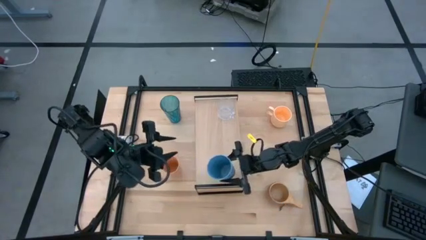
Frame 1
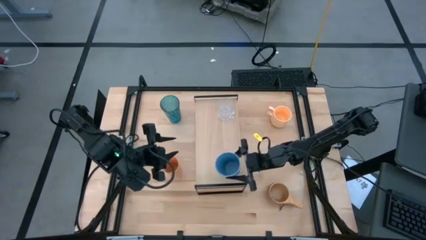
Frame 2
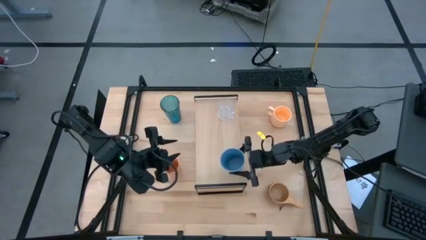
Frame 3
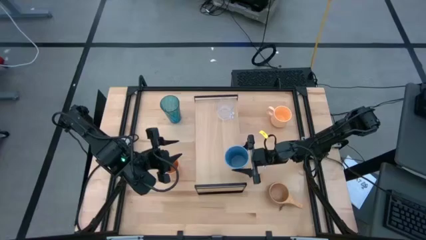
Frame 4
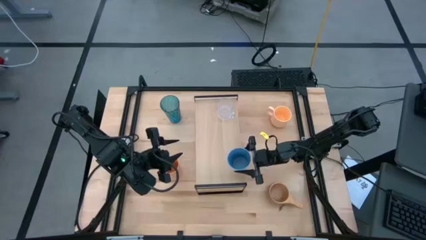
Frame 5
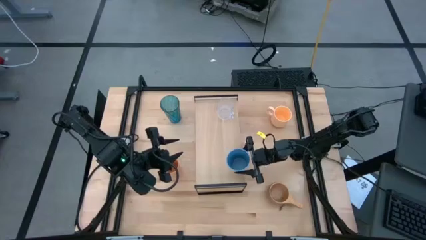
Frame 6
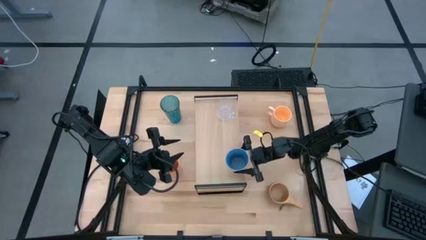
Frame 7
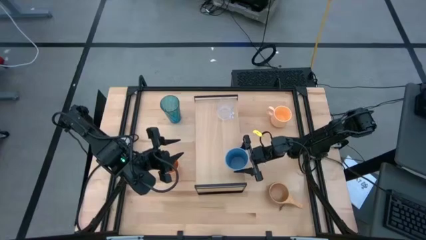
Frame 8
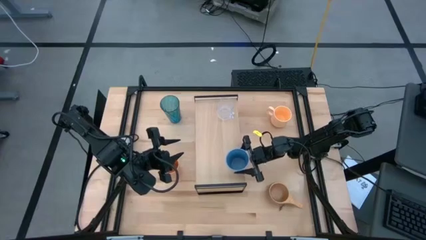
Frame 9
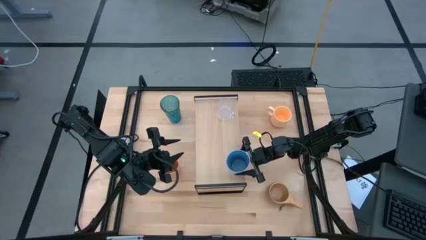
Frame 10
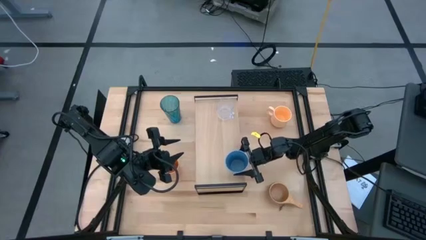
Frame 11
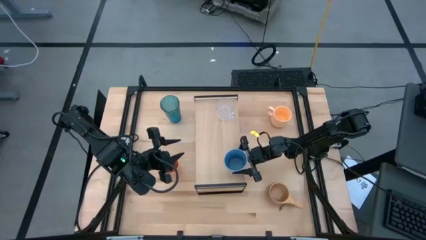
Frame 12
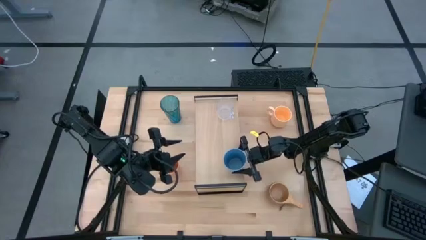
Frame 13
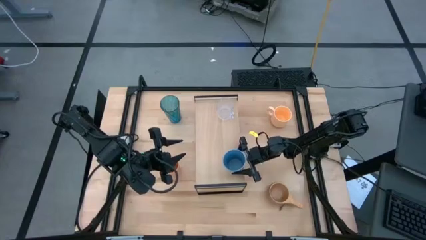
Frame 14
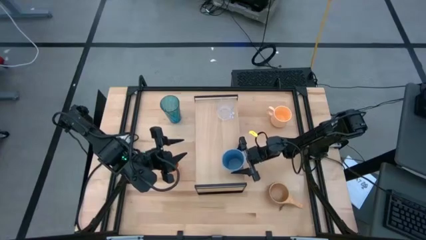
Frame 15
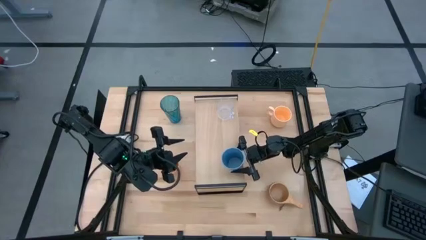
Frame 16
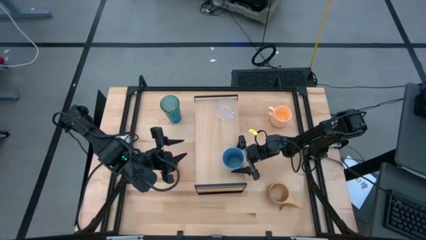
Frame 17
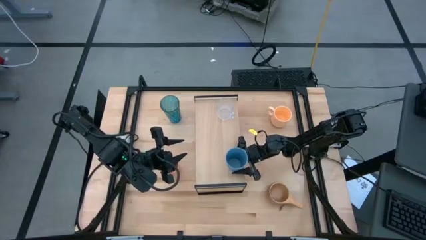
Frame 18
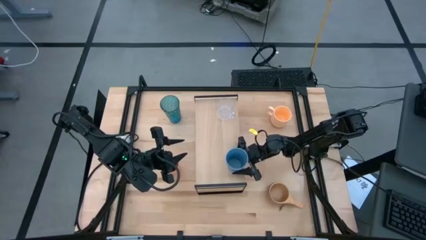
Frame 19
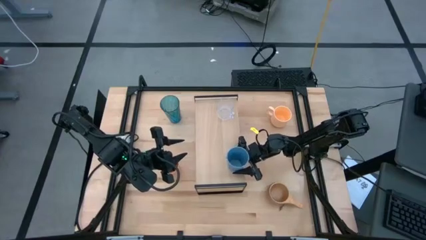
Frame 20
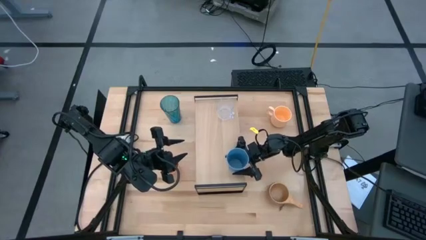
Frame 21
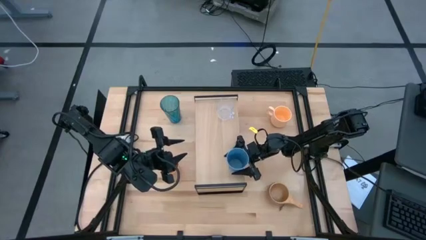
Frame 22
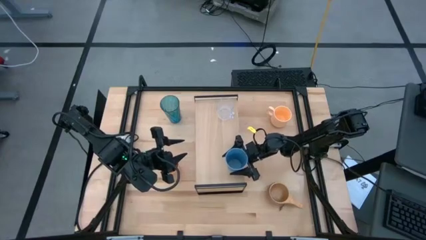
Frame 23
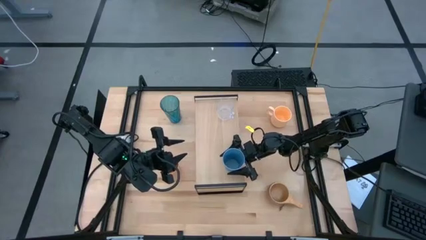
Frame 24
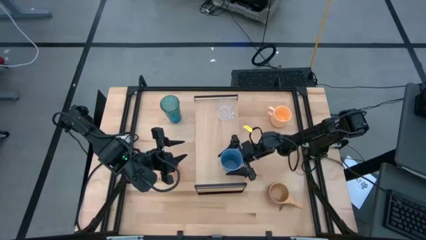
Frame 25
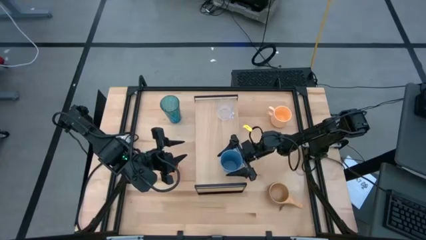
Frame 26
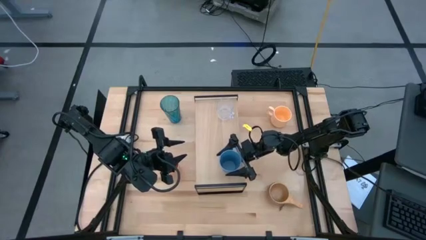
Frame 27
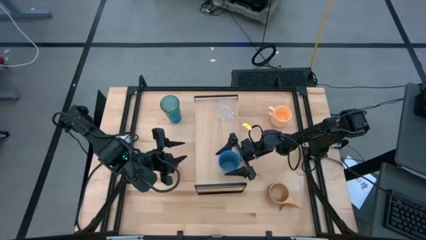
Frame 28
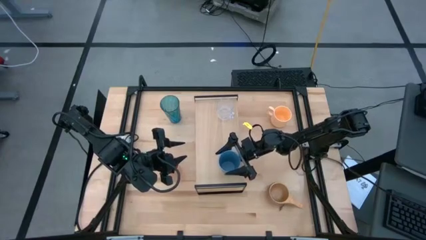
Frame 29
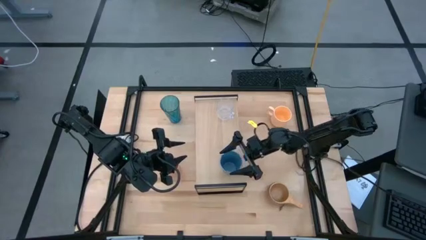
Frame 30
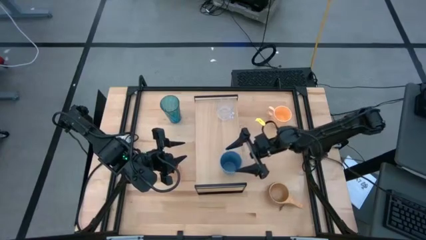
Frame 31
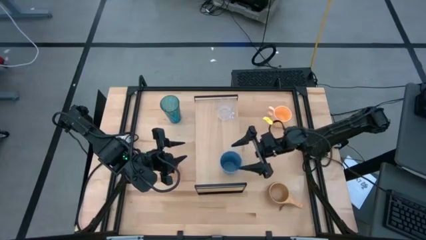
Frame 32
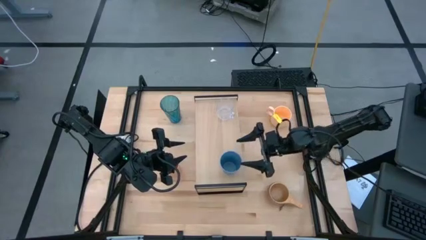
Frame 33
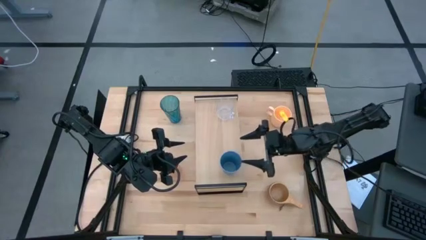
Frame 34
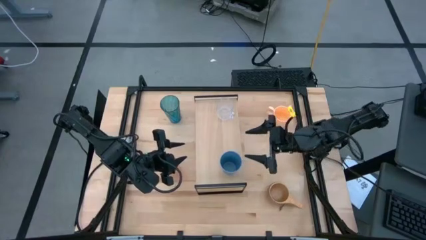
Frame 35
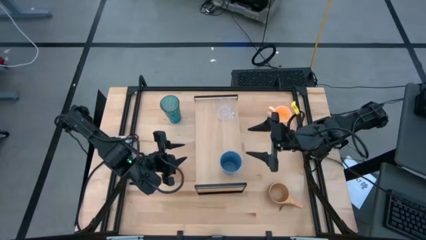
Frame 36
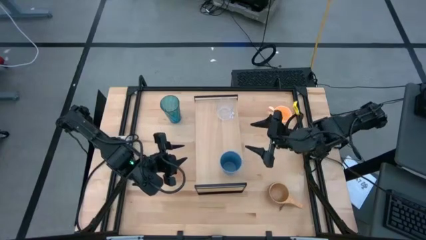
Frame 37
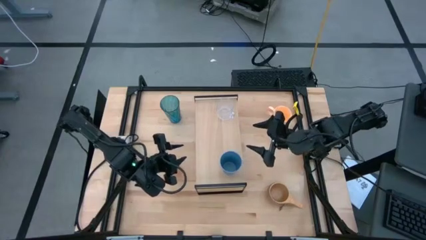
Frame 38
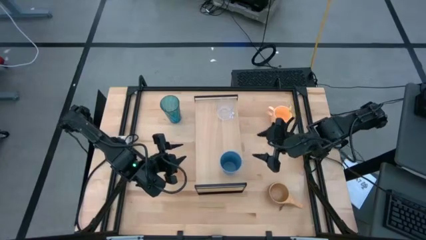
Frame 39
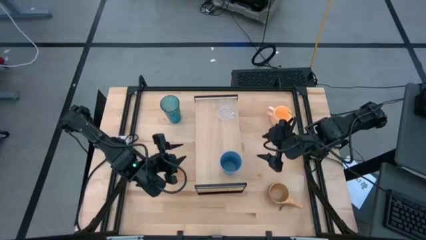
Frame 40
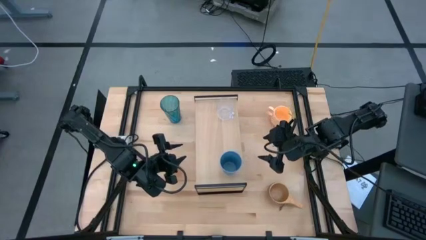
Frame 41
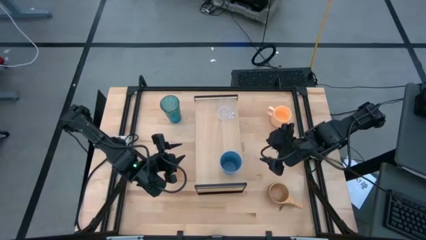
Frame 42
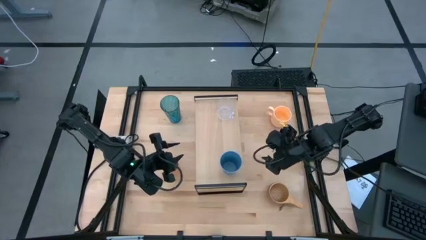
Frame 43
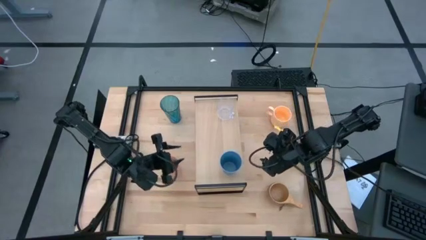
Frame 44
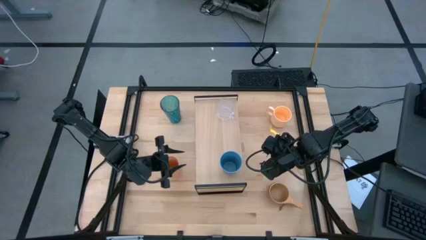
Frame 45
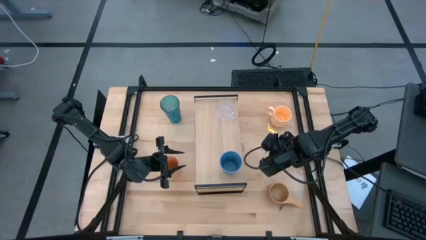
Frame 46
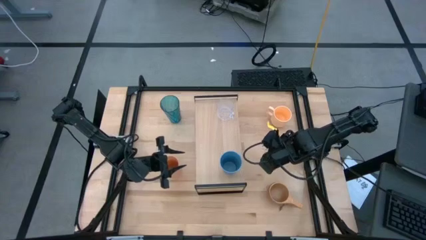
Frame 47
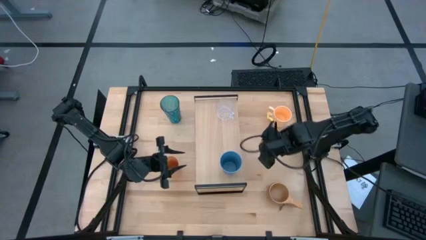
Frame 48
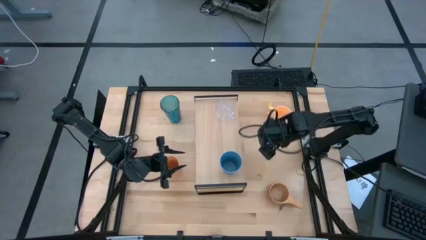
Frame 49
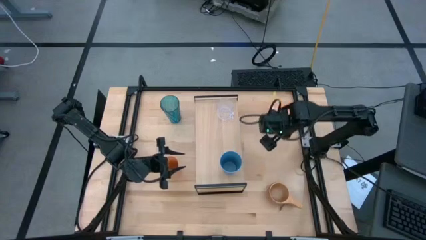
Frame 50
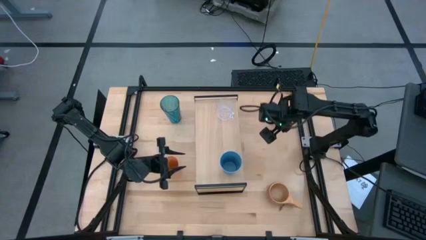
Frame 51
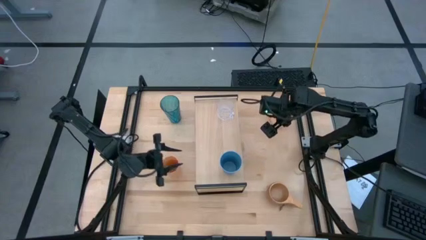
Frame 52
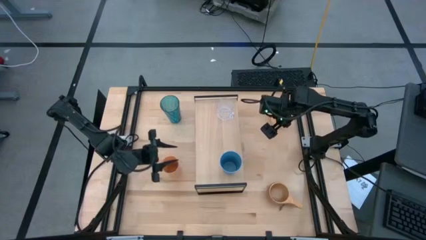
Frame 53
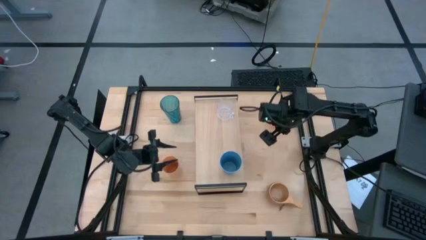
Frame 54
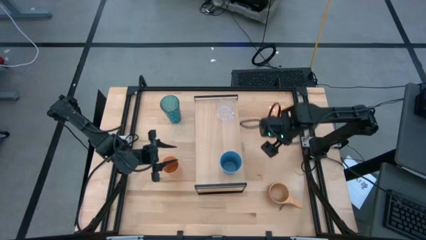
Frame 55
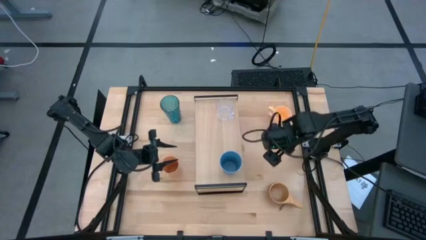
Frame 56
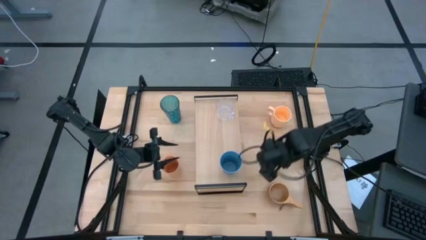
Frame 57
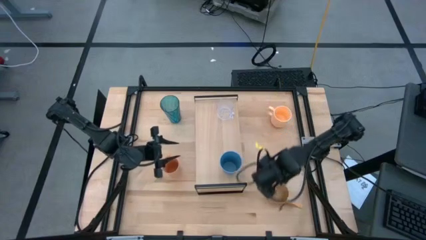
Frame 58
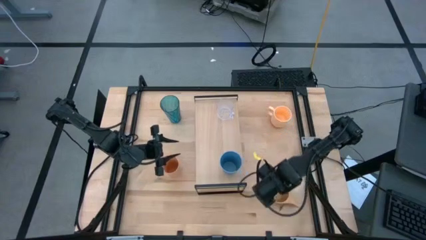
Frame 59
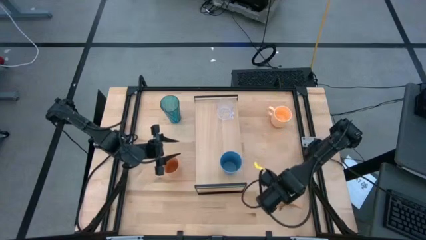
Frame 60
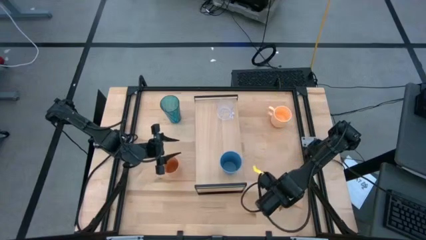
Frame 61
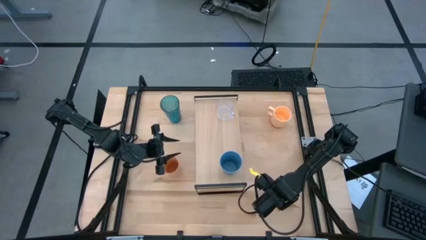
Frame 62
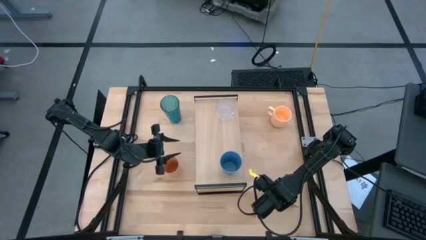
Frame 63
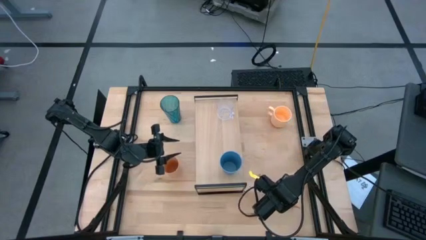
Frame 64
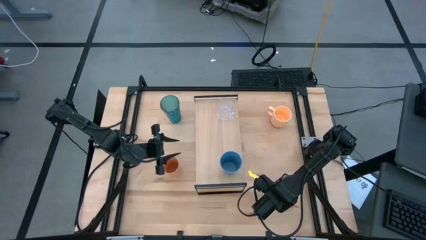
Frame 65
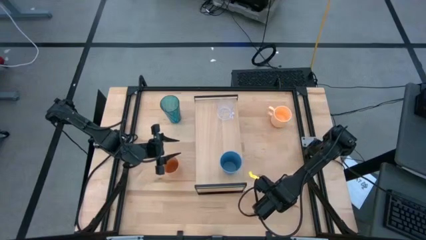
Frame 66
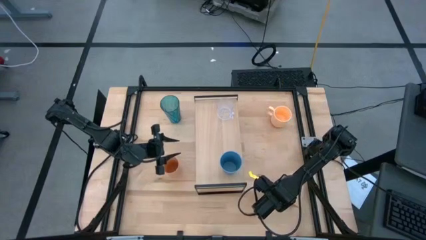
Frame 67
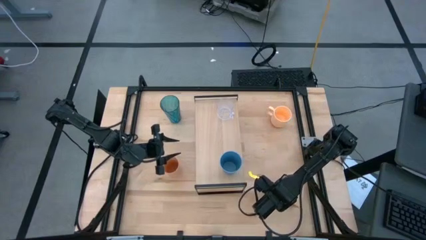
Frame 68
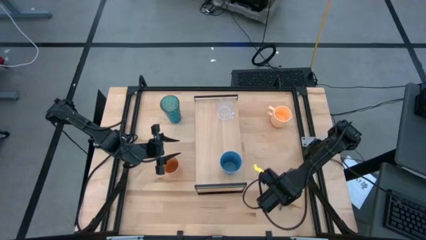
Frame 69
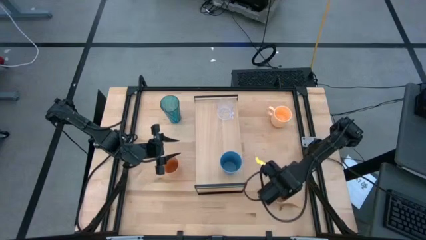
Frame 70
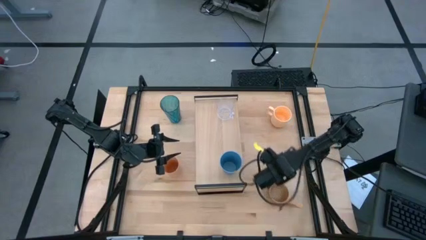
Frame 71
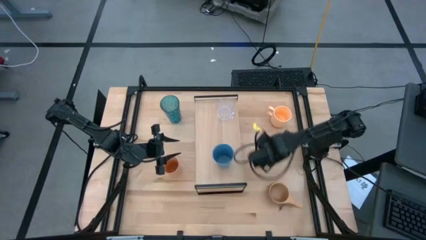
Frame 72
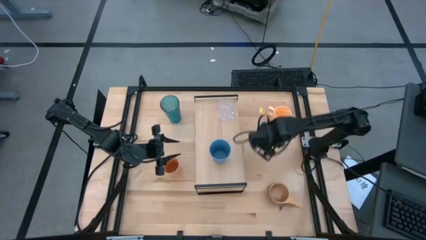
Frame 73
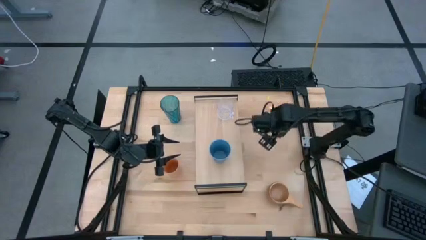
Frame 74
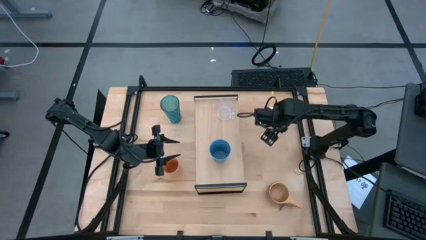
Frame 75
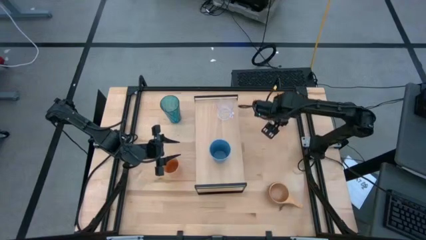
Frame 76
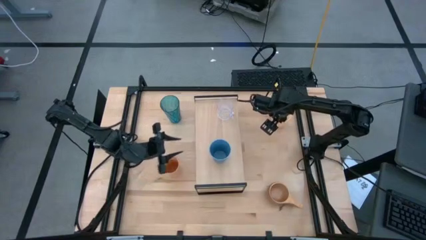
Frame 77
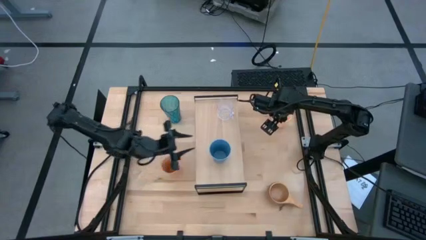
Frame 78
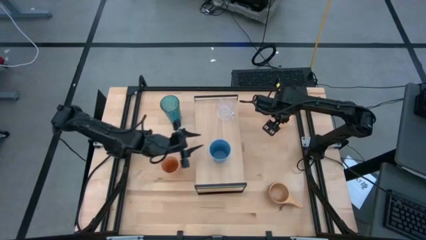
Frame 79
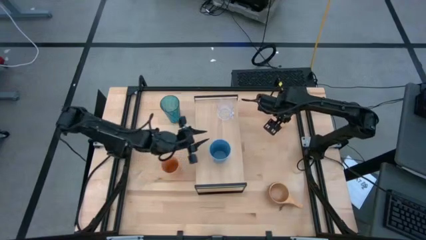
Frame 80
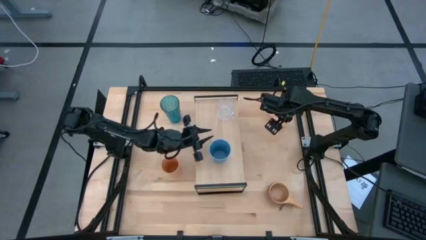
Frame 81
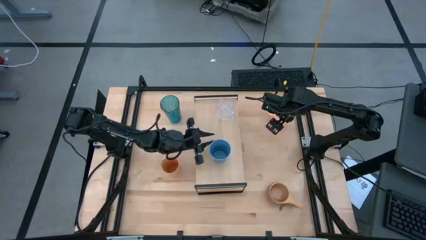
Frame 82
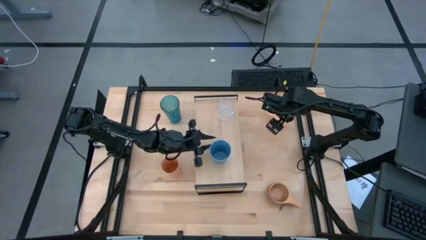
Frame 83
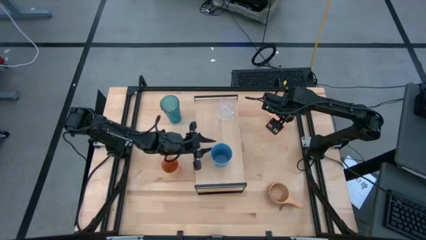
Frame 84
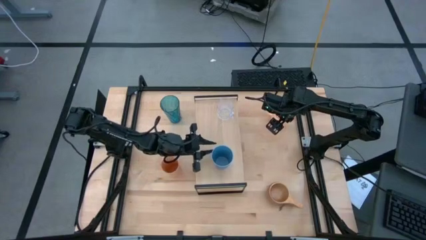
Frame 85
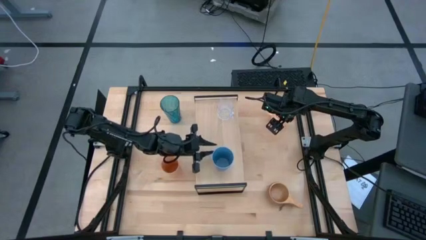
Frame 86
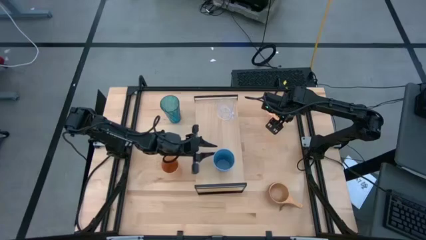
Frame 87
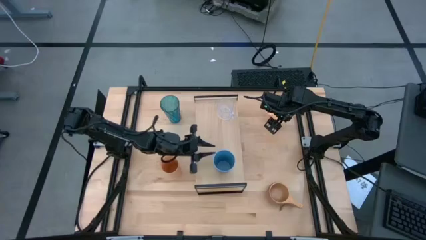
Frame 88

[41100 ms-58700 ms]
Task: Stack small to large cups/mugs on shelf
Put the light blue cup on the shelf
